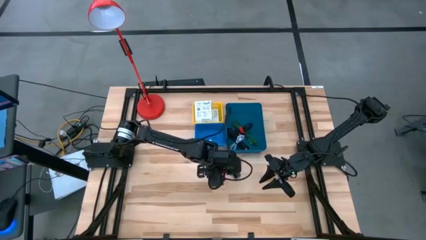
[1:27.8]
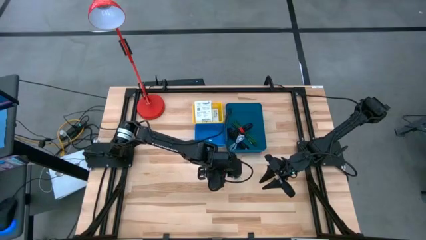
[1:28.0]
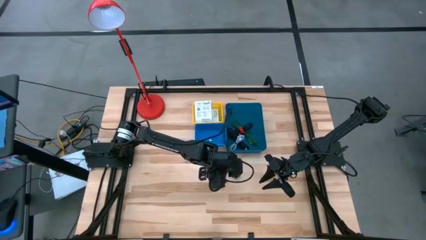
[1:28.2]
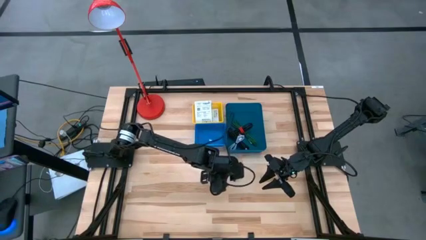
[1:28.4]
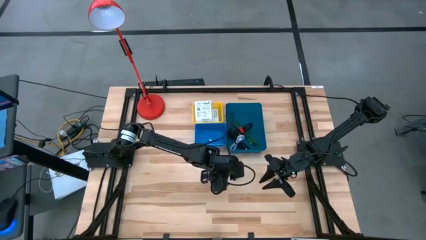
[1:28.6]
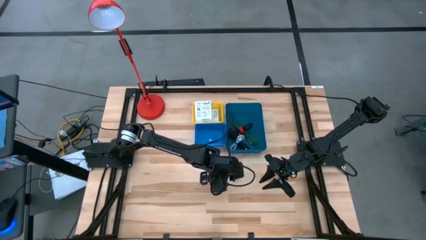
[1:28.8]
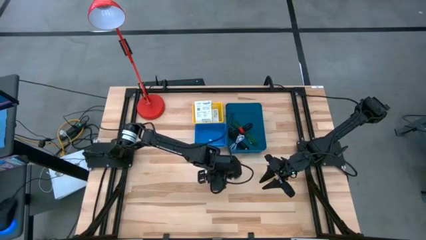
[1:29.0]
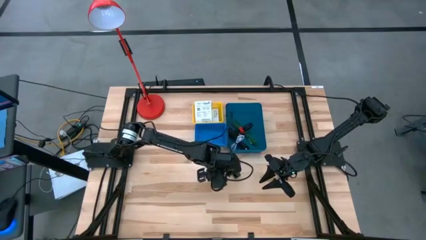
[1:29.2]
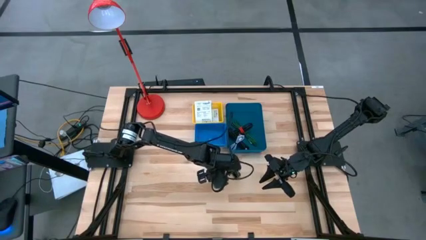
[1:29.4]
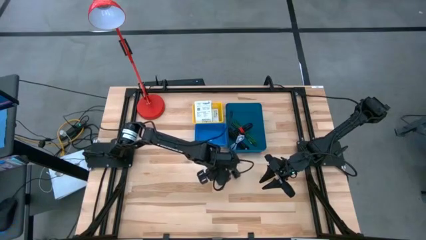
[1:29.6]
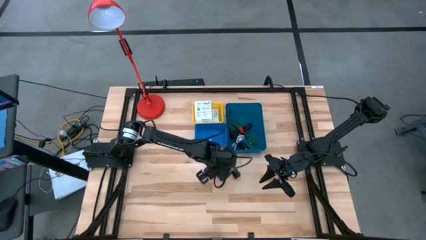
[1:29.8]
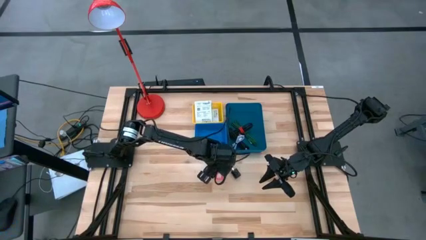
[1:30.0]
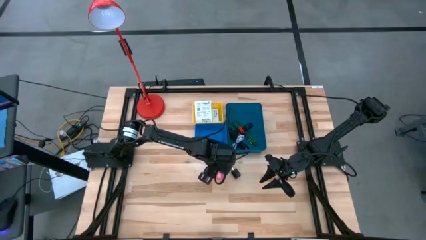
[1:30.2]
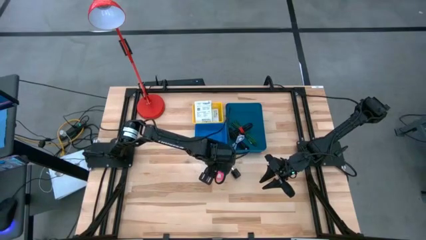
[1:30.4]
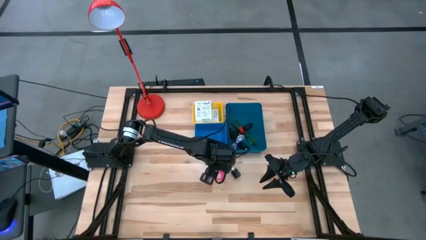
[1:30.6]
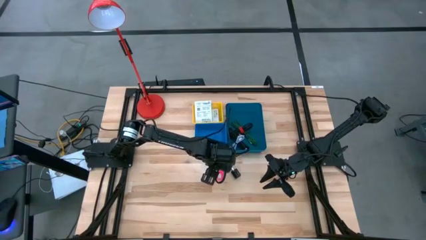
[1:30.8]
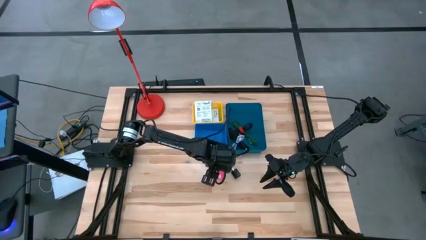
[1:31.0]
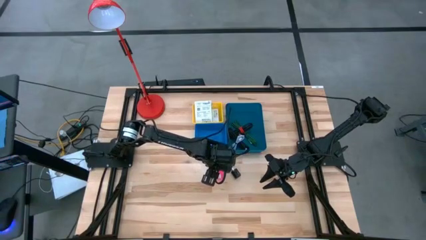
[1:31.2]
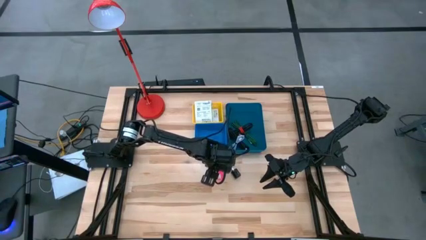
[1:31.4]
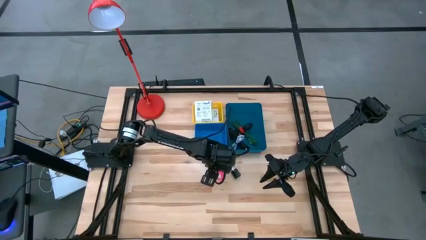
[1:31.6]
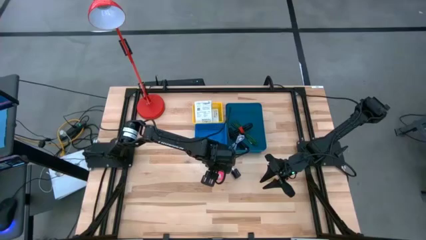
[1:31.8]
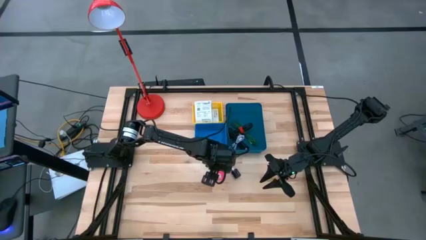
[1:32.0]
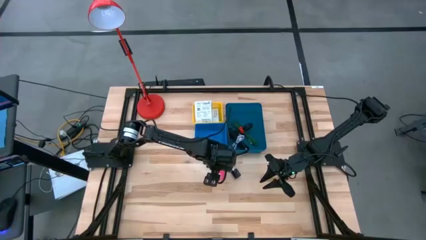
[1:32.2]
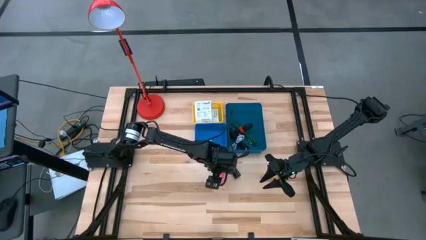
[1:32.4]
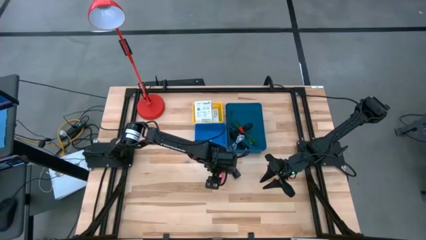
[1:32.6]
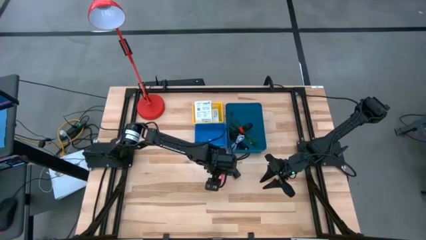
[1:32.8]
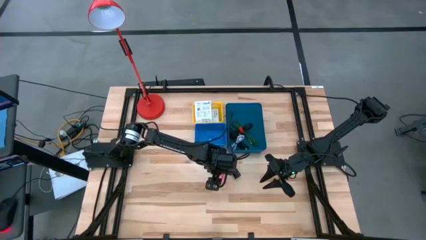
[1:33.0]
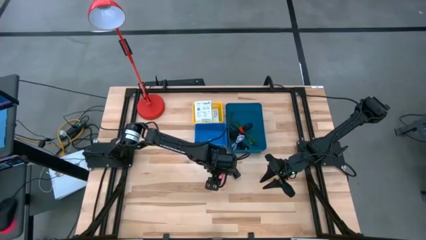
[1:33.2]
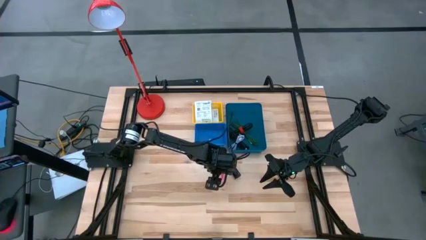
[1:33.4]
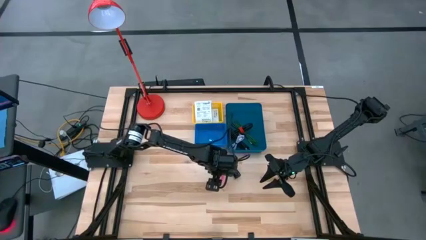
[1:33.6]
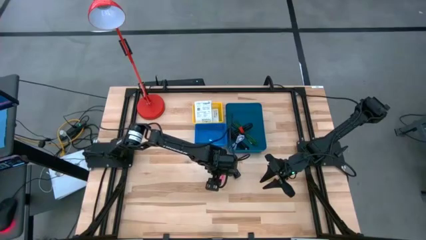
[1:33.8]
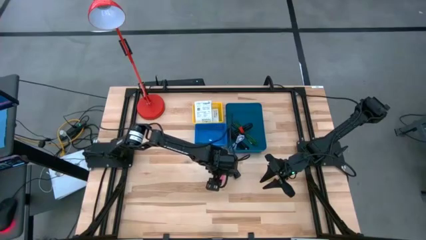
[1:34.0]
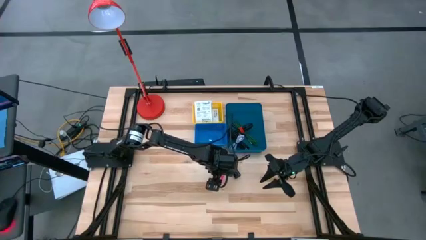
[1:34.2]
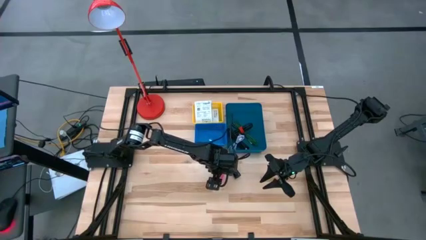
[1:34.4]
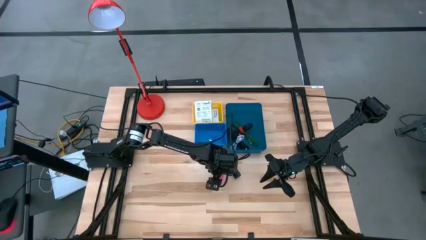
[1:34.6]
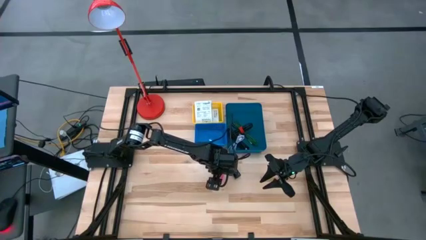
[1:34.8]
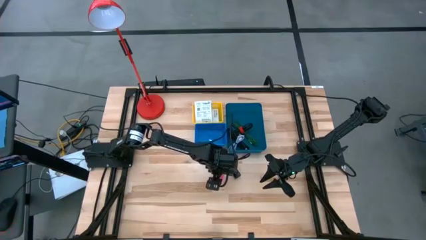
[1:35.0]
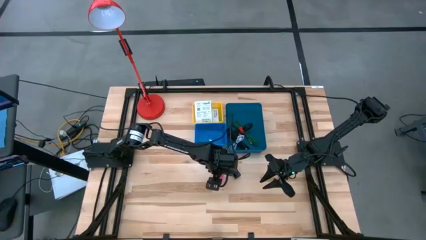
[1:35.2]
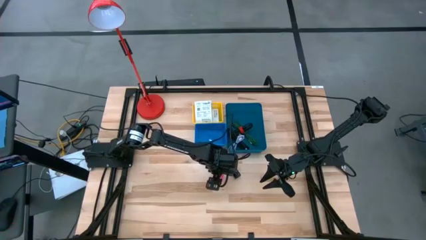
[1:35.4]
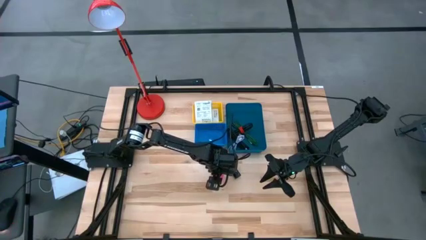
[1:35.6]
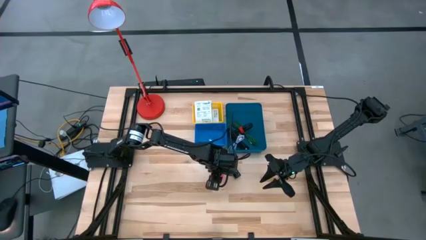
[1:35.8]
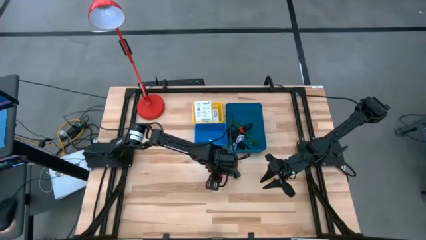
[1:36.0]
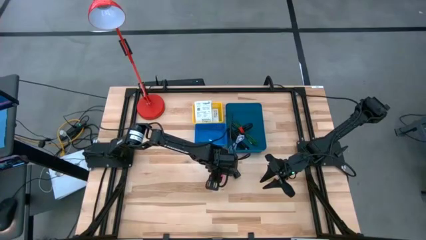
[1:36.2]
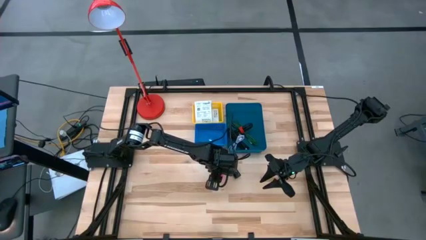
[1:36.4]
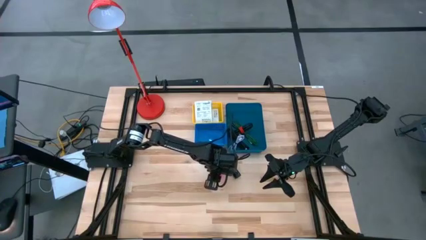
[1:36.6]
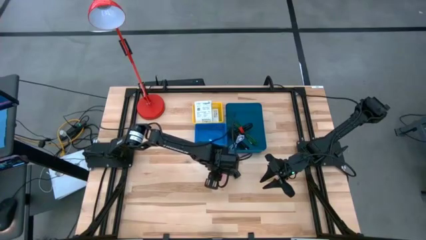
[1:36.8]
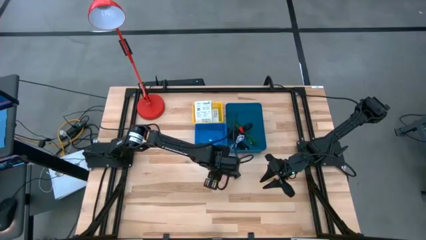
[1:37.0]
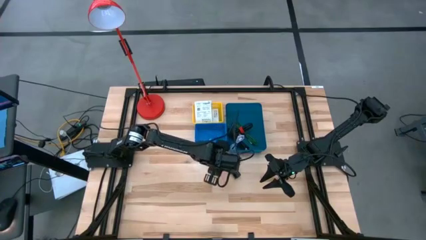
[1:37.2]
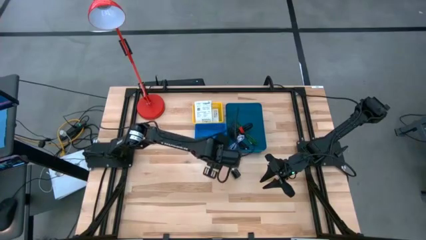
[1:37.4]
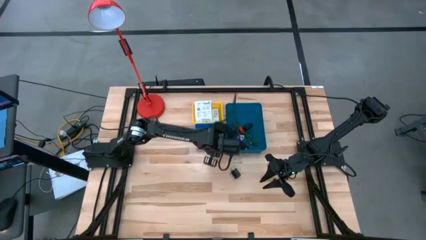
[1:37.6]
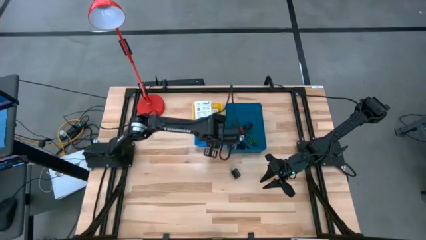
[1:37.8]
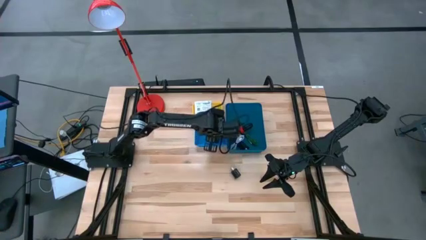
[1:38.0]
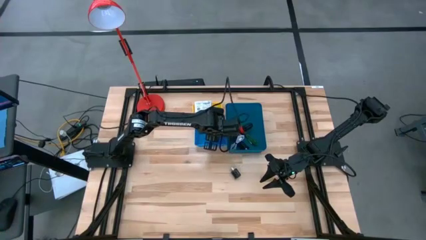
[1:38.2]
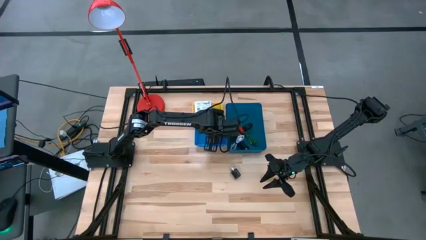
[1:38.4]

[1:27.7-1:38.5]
Task: Pick and place items into bin
Put the pink charger adapter into the dark blue bin

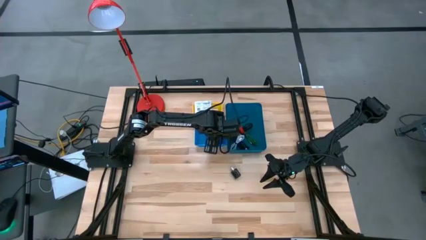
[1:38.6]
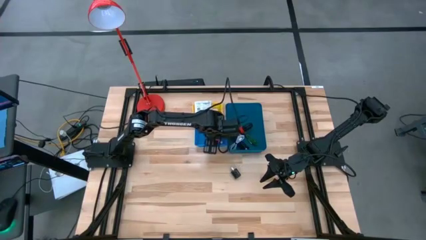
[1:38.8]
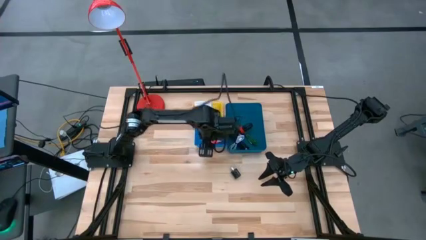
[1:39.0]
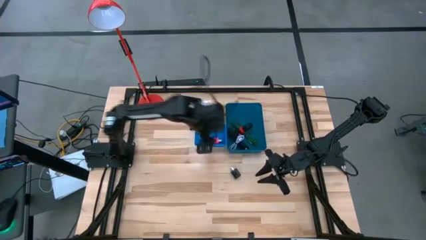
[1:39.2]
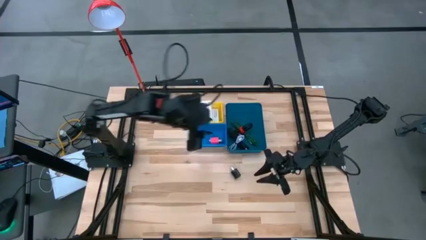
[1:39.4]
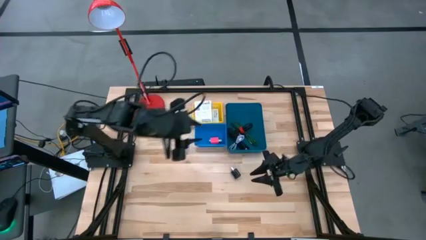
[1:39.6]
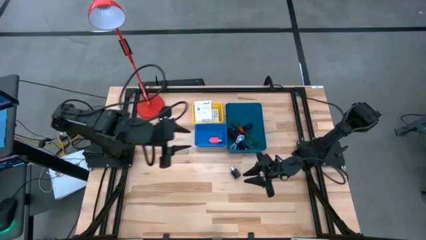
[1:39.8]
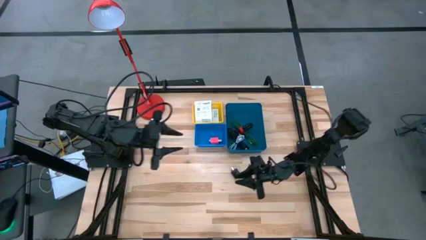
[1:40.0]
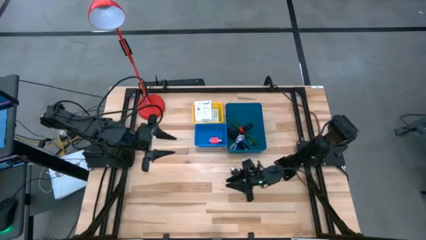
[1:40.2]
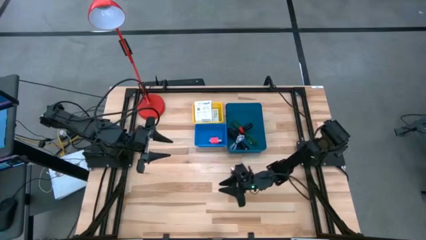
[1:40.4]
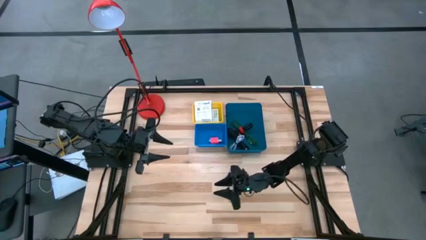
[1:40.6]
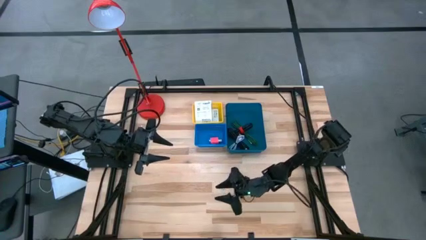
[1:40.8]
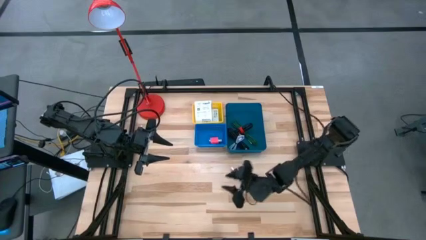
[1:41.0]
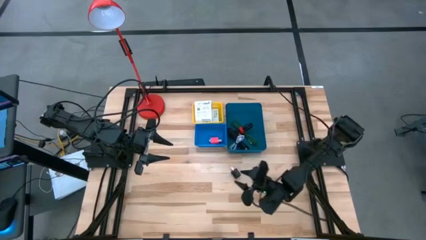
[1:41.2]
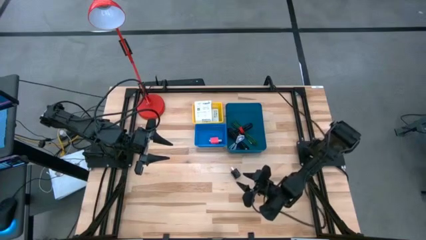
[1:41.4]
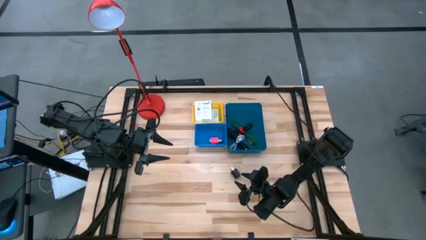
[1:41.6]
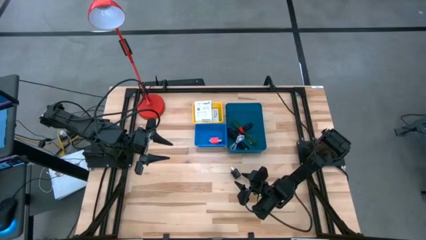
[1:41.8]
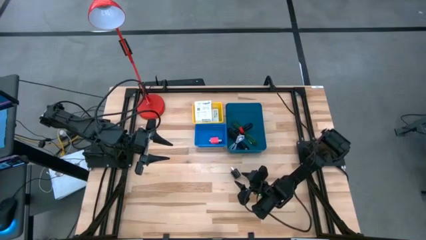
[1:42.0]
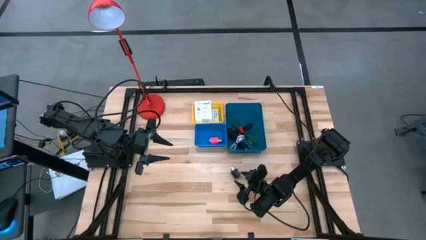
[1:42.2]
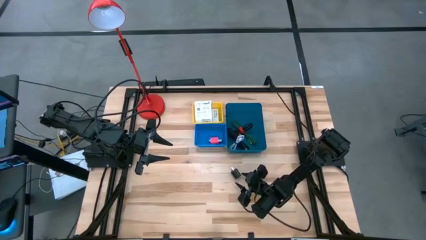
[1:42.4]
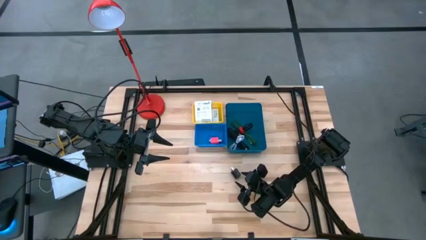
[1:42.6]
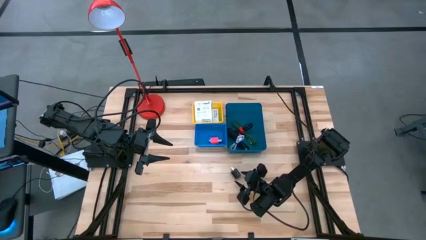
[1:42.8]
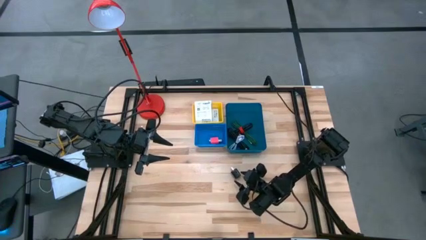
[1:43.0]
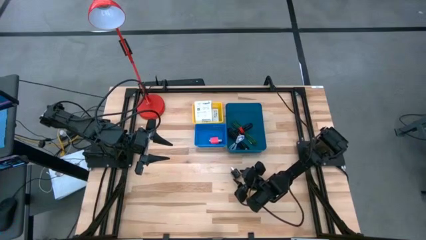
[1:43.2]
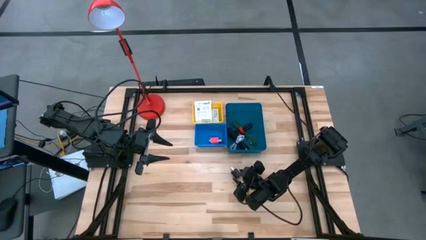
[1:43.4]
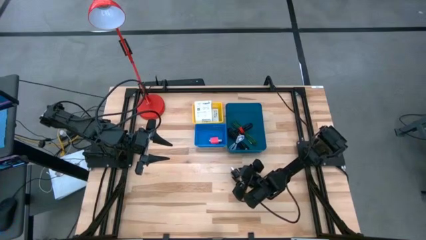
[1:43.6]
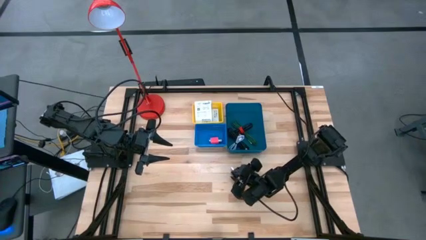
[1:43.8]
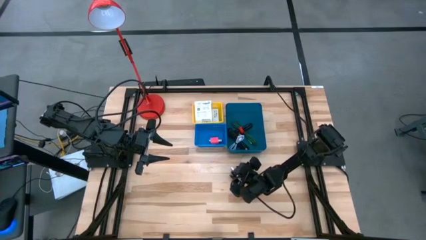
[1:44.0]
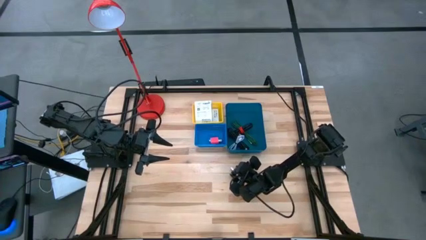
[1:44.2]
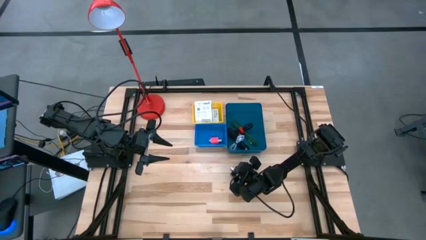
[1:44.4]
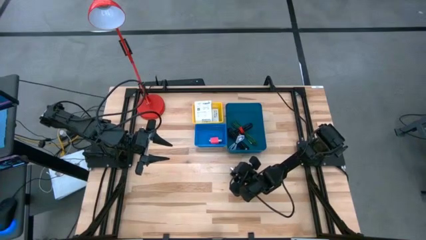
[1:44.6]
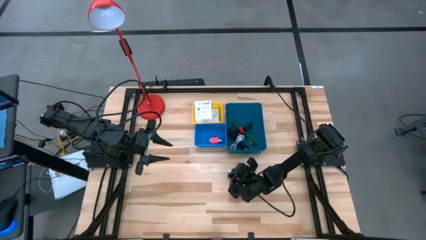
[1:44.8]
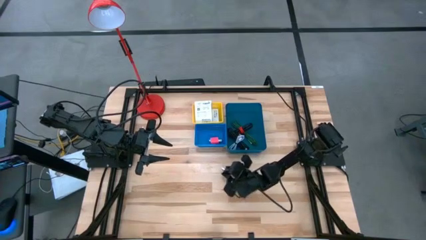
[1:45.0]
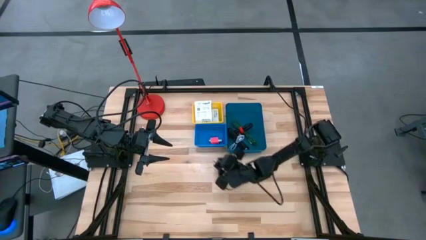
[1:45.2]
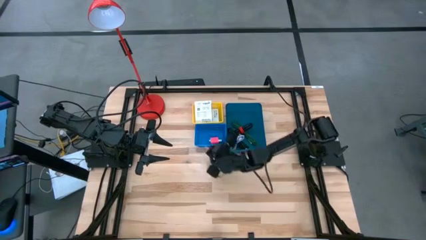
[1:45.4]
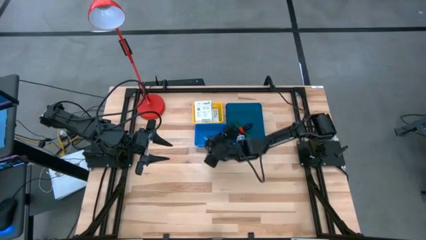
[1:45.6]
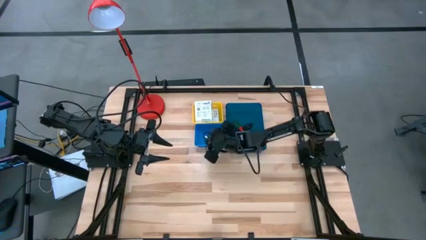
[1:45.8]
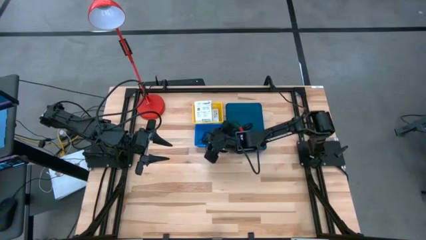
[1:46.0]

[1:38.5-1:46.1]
Put the black charger adapter into the dark blue bin
